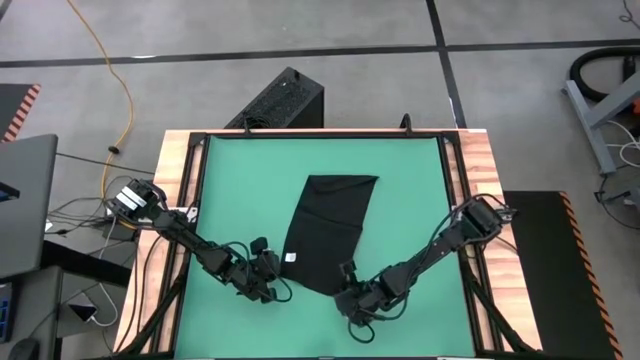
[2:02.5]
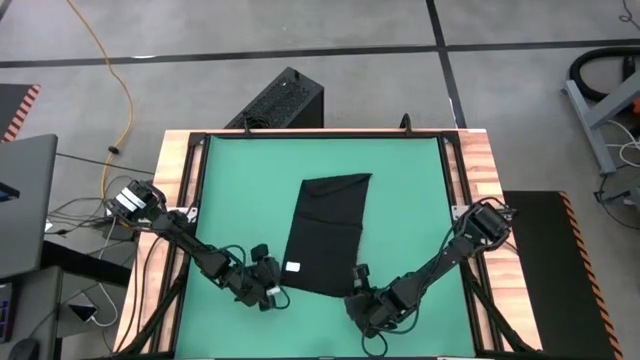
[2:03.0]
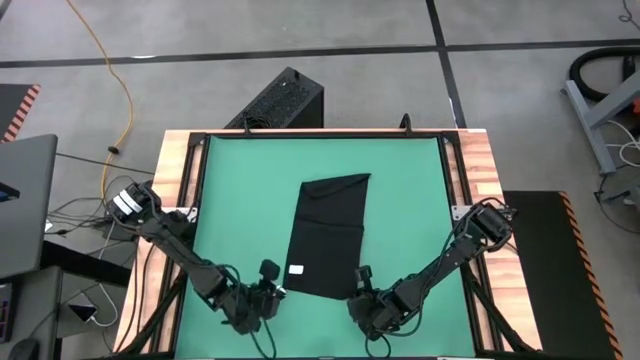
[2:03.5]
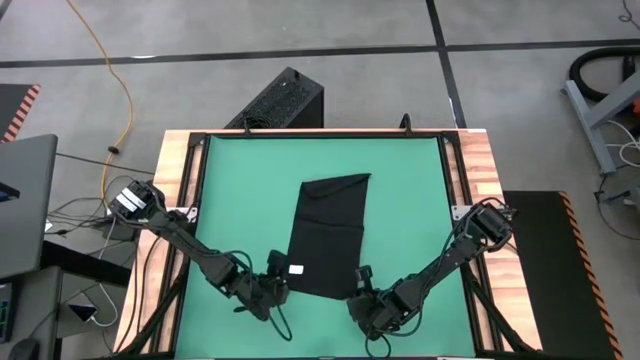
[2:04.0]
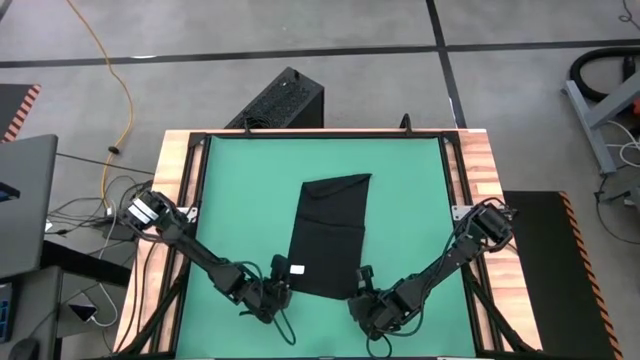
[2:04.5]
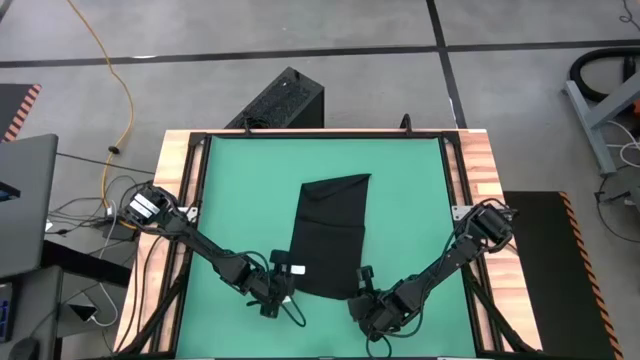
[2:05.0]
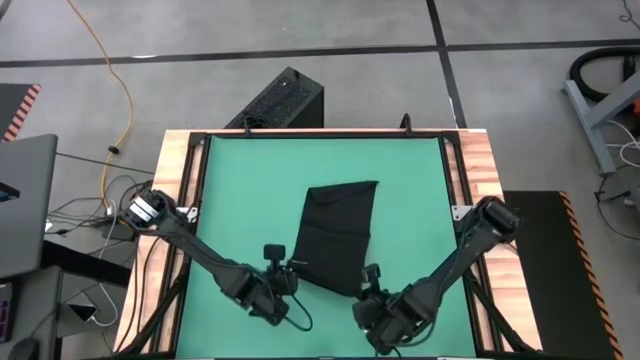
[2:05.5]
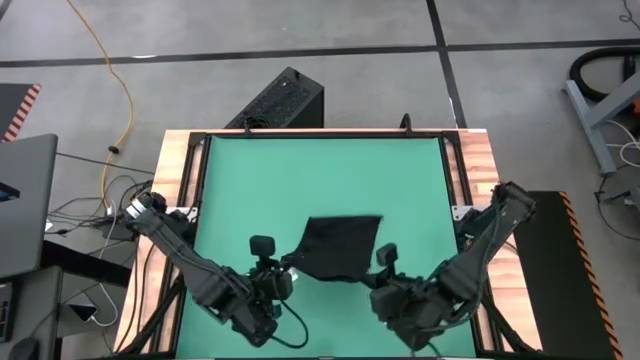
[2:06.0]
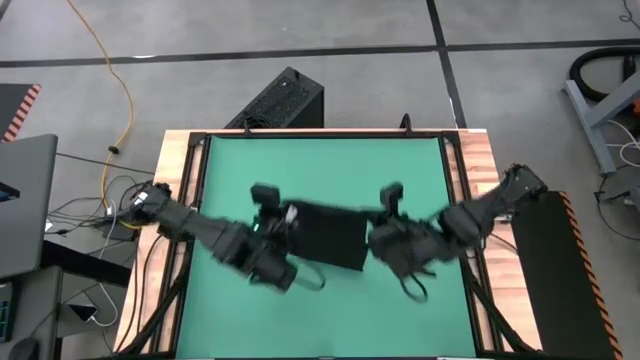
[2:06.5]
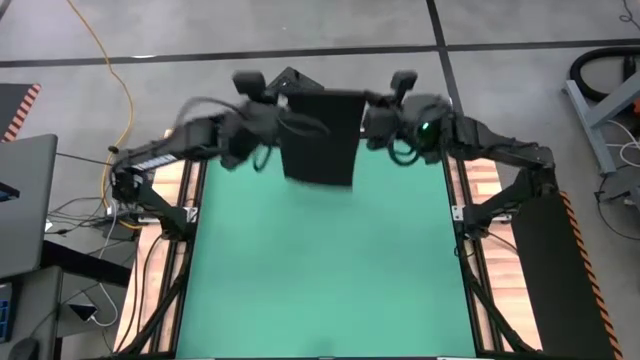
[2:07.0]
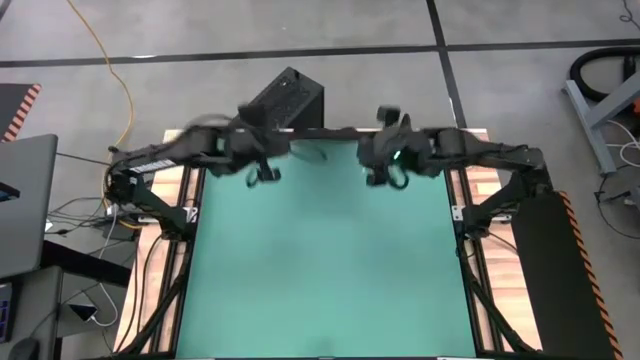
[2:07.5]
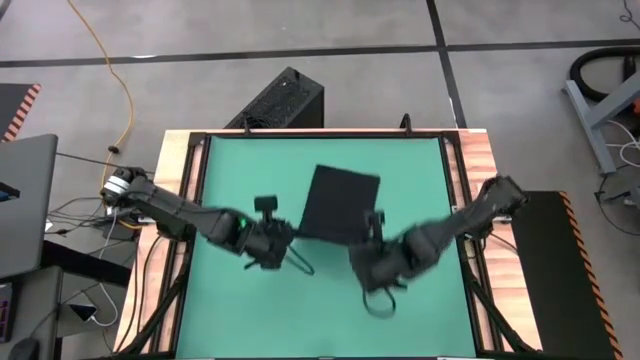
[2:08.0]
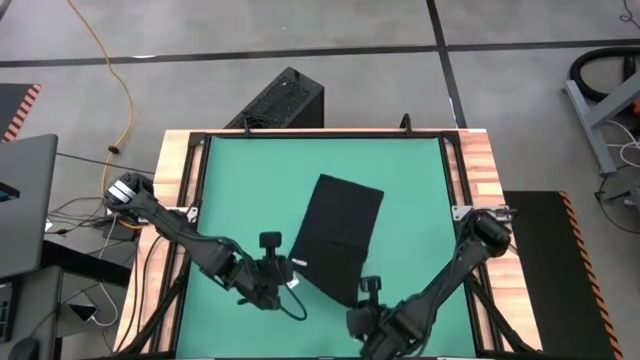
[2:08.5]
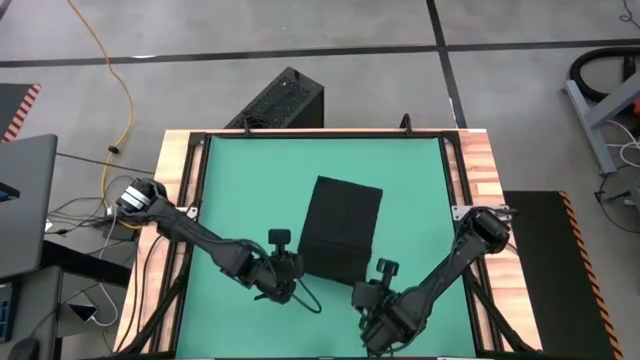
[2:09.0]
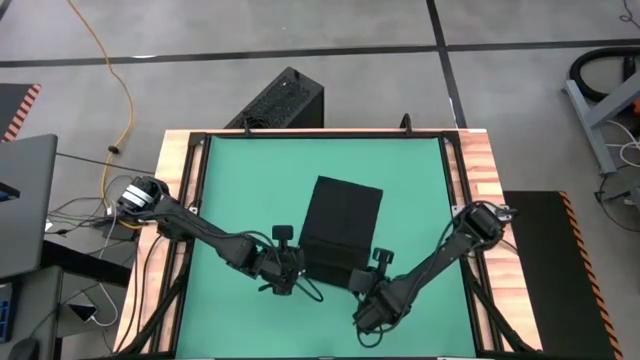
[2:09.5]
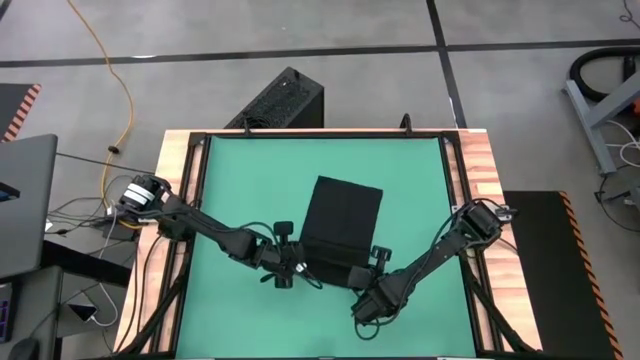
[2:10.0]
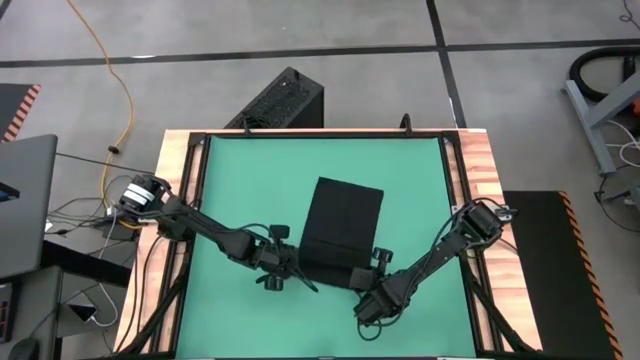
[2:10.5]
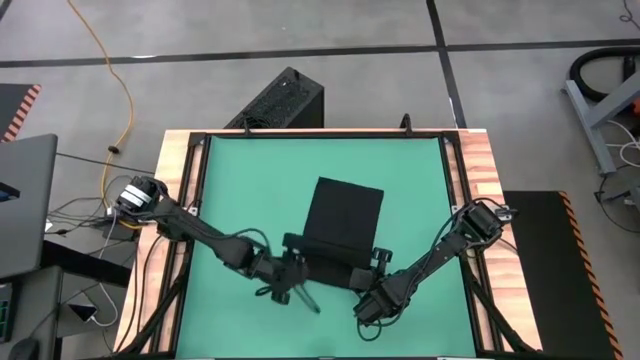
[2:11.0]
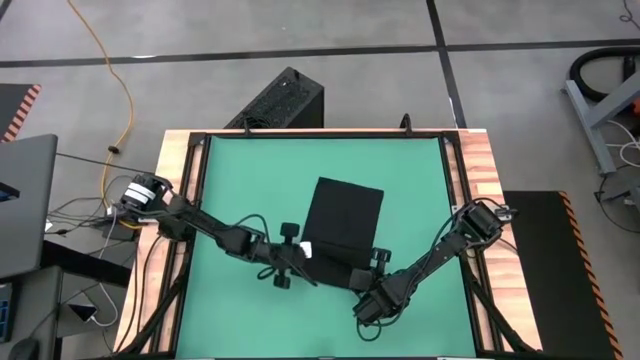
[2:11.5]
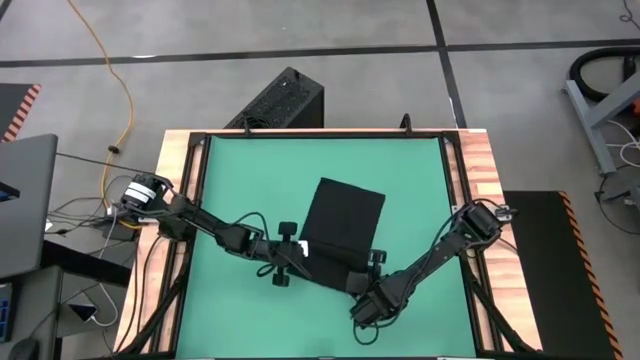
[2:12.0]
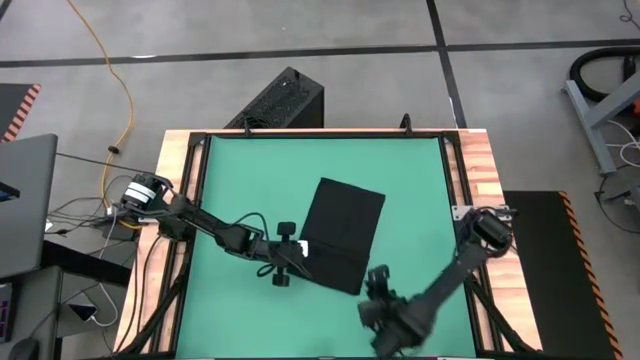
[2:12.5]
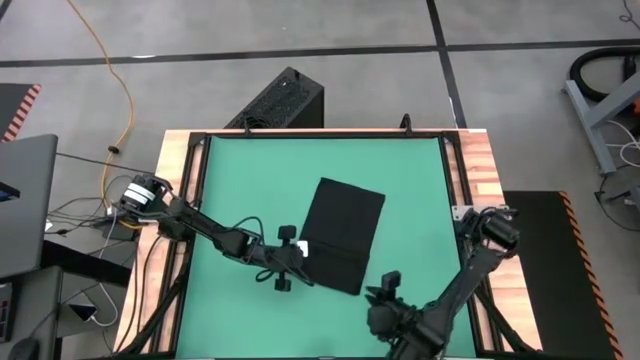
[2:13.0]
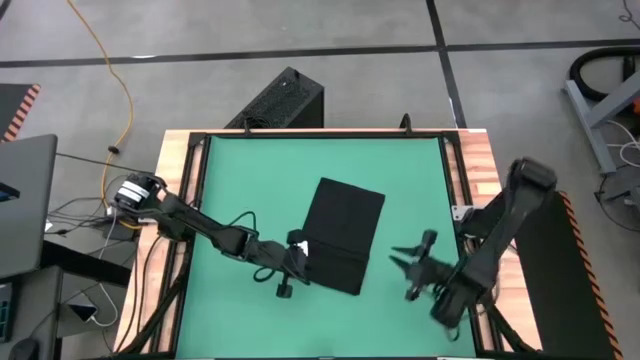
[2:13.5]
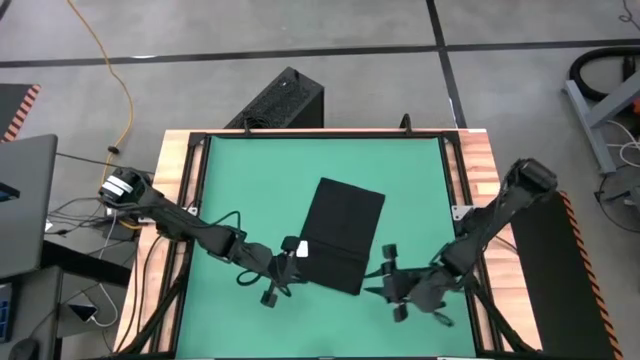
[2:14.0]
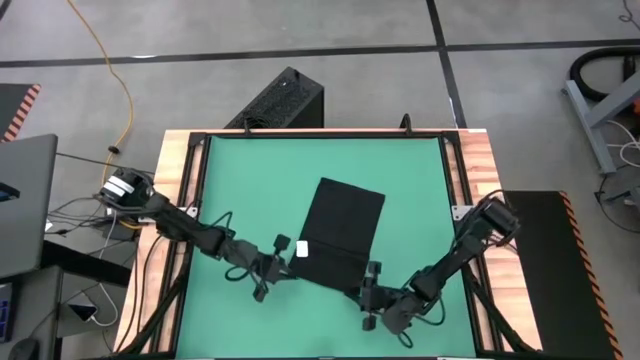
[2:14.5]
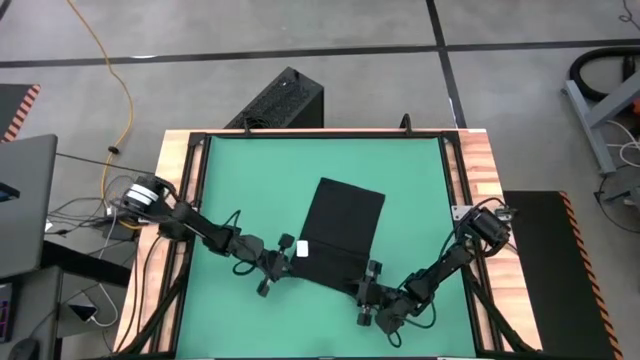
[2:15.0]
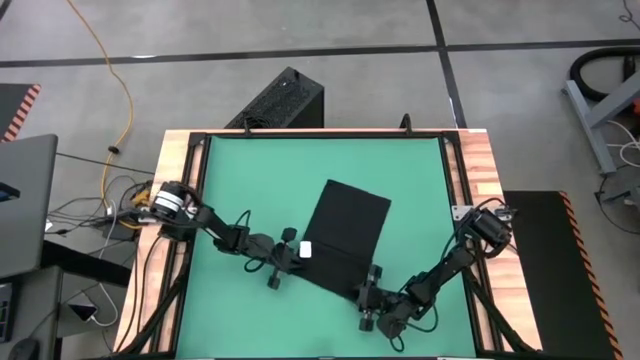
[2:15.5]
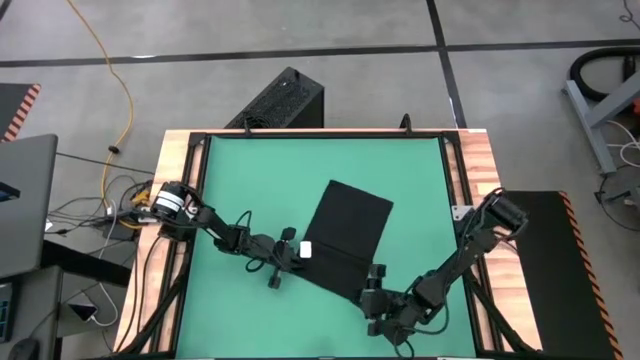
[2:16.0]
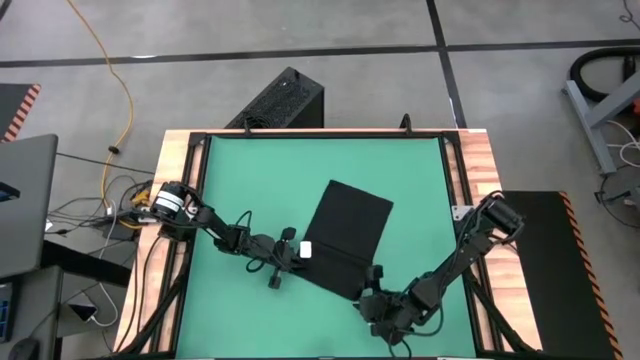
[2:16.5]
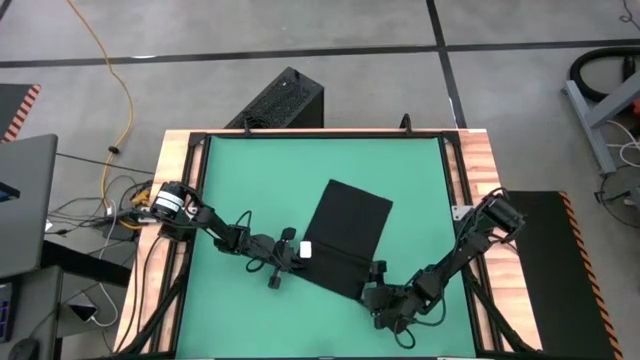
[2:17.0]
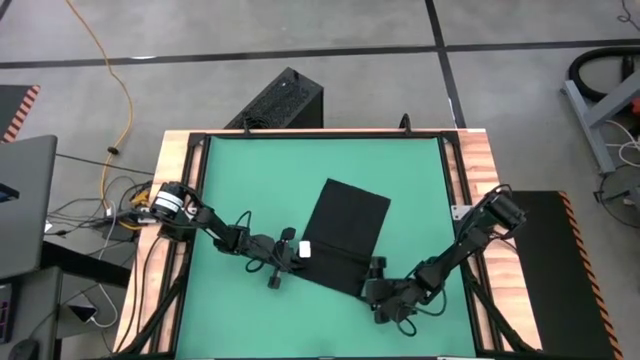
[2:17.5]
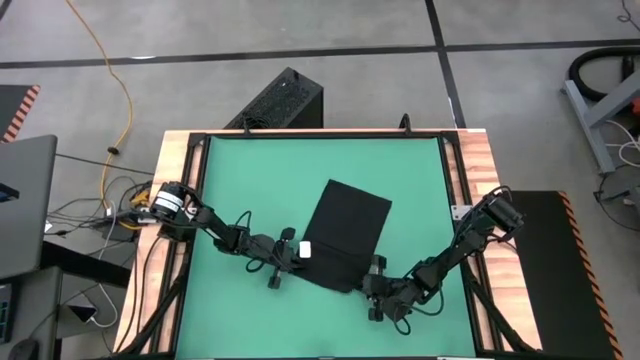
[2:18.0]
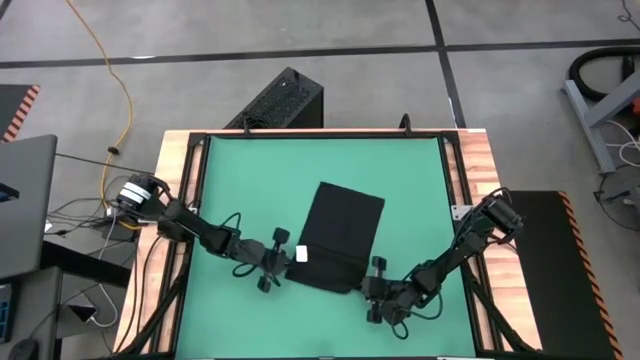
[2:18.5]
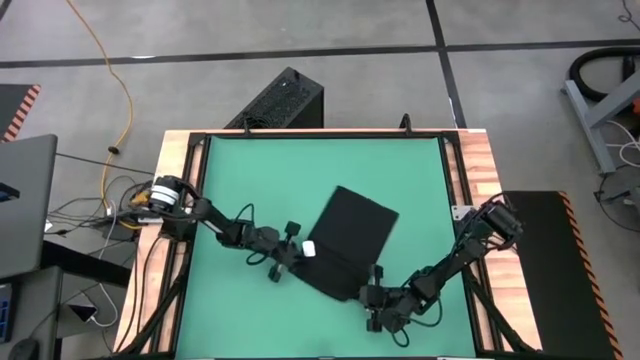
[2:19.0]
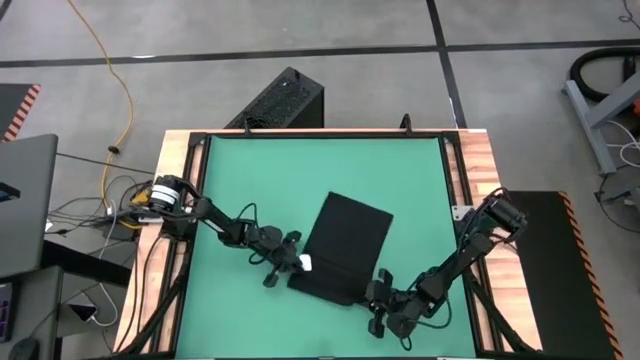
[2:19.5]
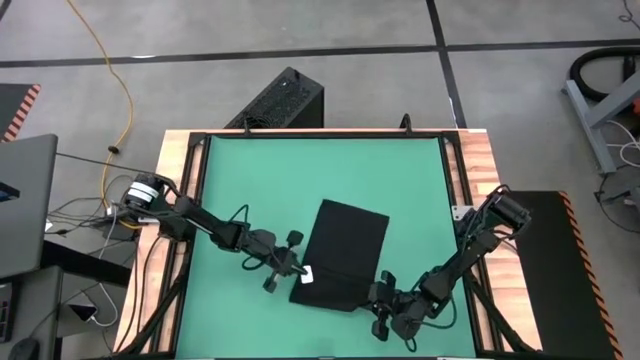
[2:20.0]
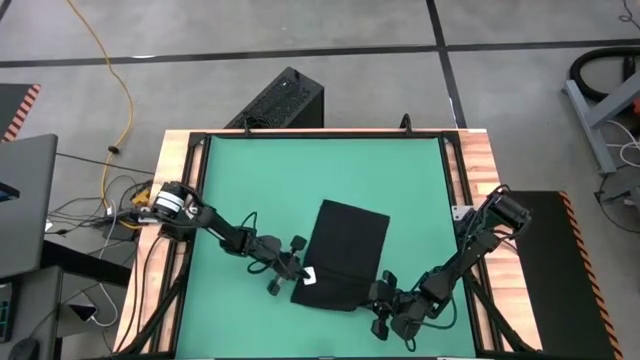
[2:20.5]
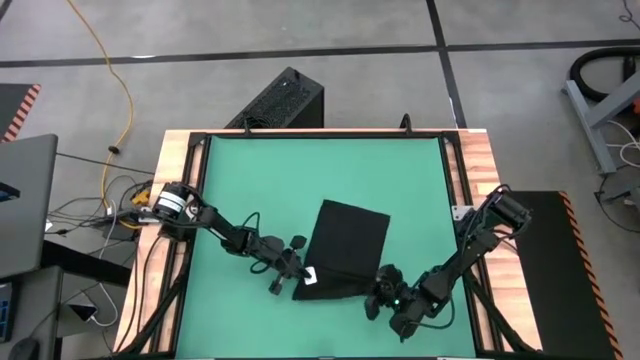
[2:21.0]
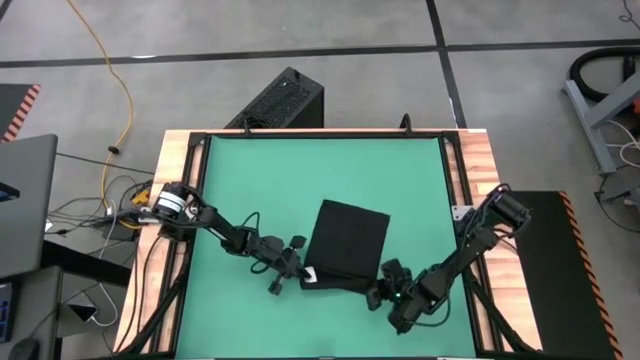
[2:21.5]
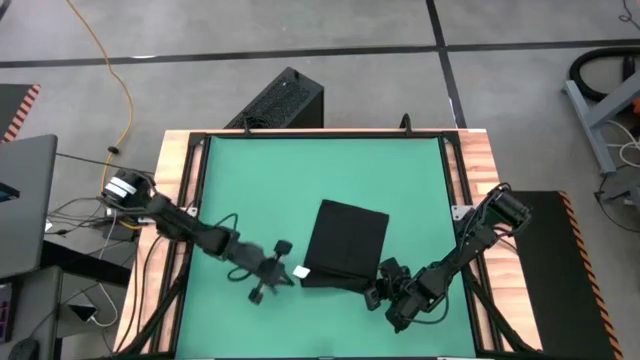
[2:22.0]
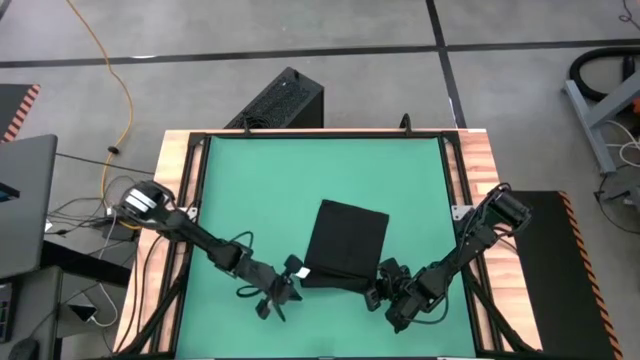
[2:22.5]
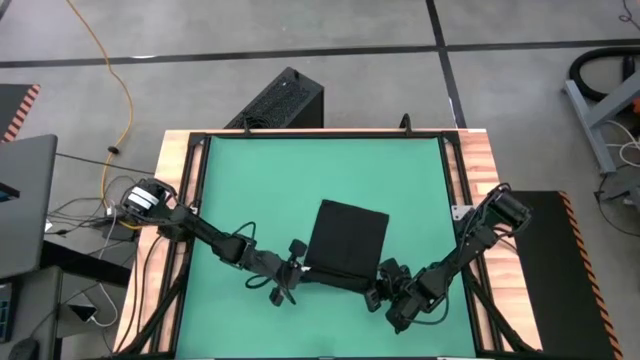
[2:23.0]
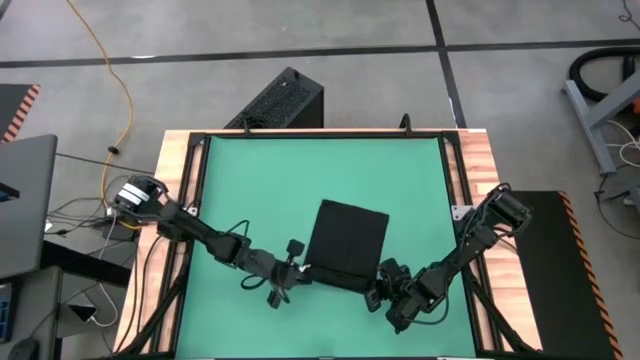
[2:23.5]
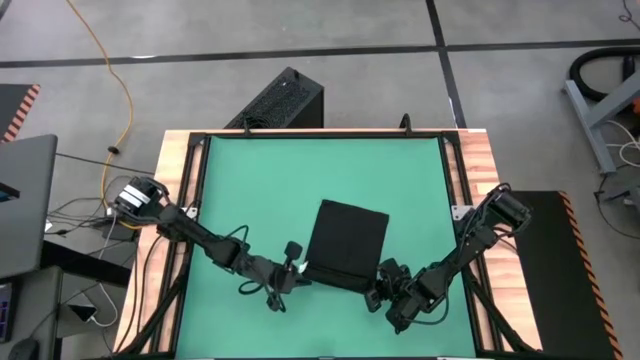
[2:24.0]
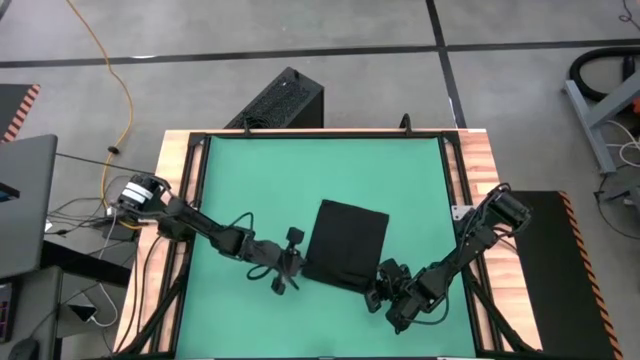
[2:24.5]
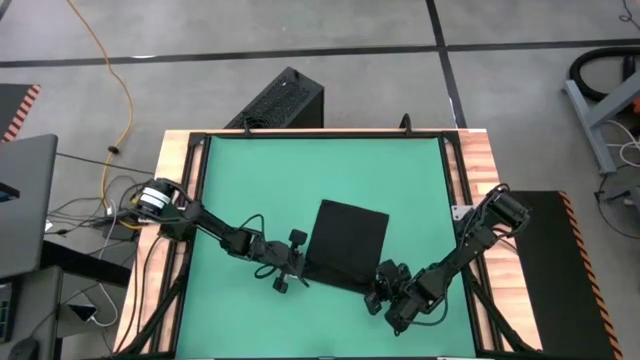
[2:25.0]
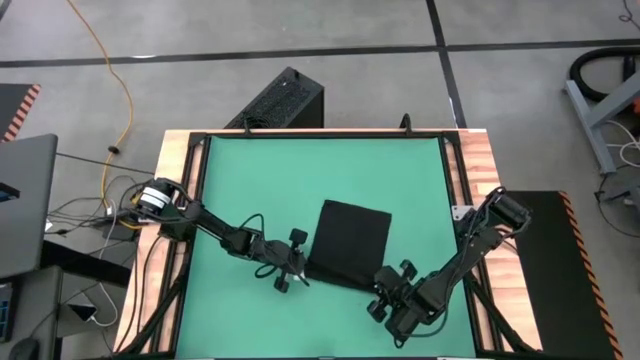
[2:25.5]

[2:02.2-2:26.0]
Task: Roll towel into tight, uniform cylinder
Roll the black towel
